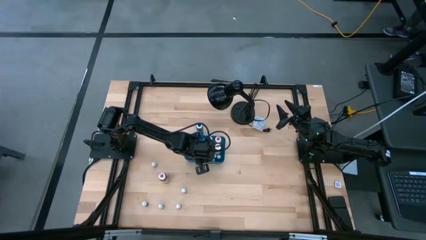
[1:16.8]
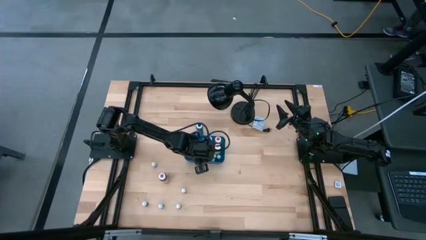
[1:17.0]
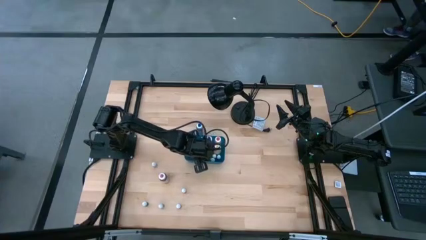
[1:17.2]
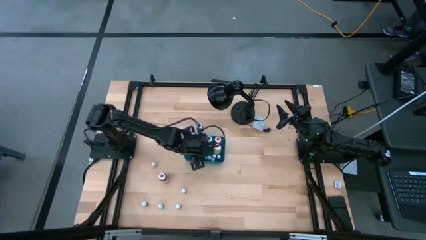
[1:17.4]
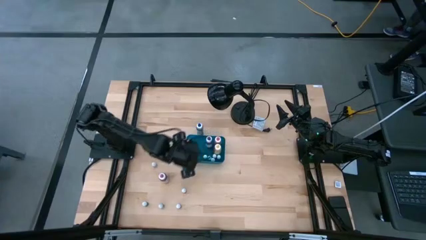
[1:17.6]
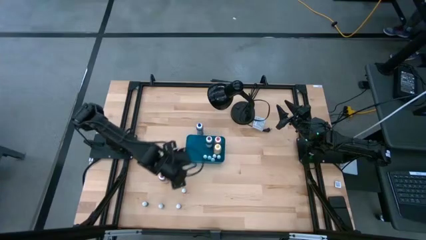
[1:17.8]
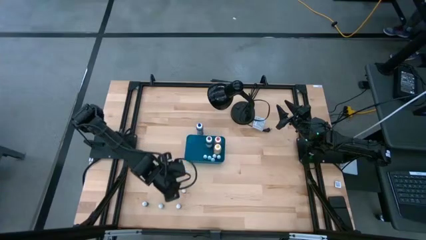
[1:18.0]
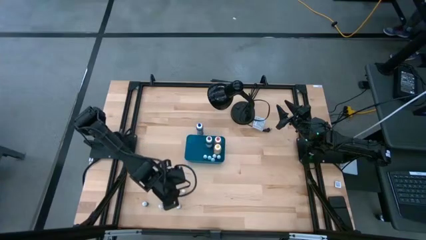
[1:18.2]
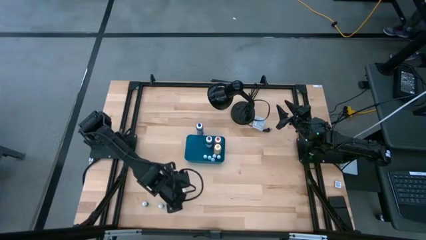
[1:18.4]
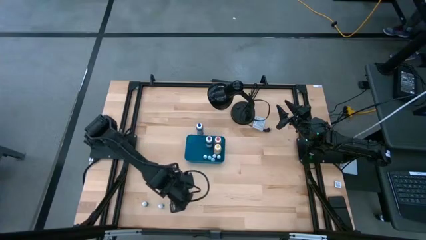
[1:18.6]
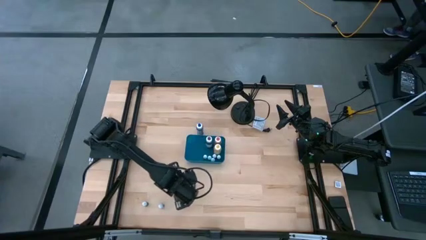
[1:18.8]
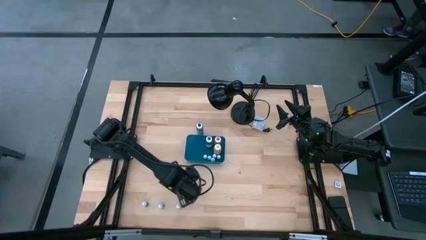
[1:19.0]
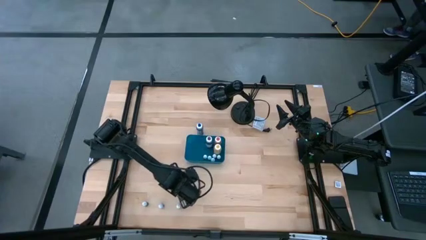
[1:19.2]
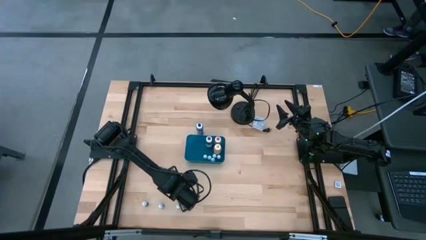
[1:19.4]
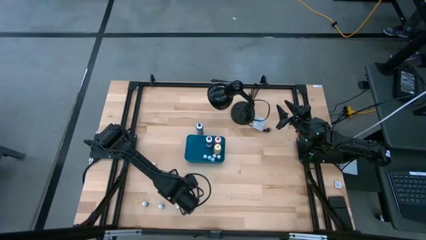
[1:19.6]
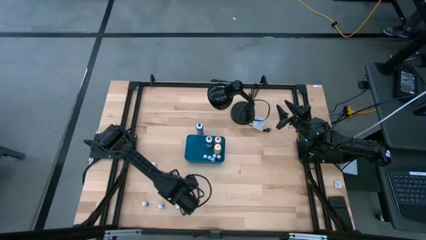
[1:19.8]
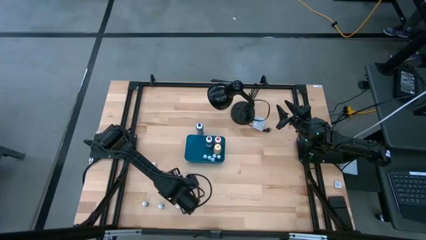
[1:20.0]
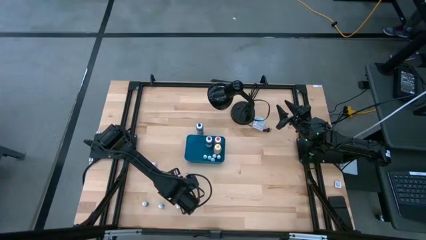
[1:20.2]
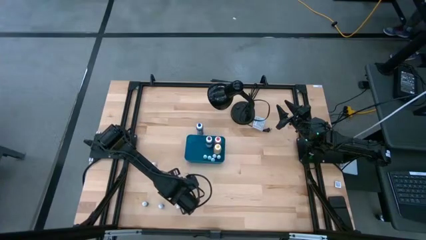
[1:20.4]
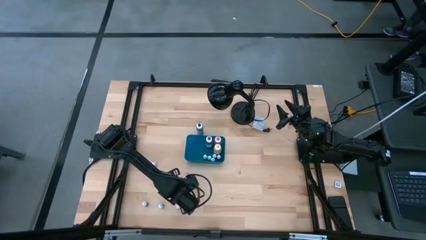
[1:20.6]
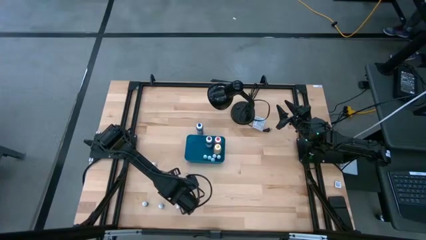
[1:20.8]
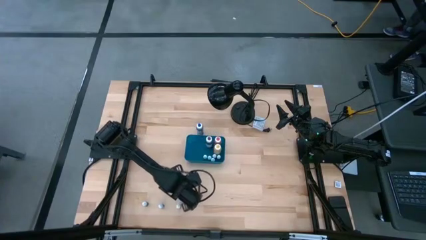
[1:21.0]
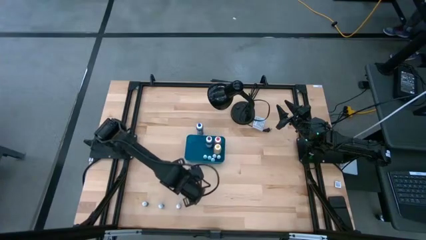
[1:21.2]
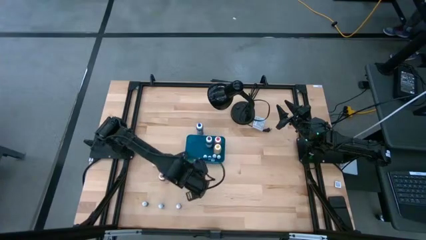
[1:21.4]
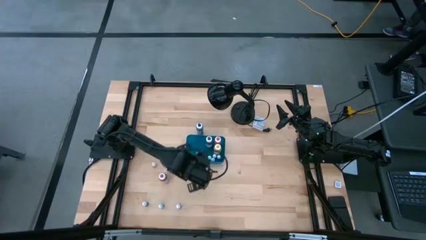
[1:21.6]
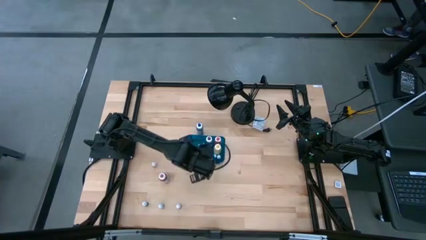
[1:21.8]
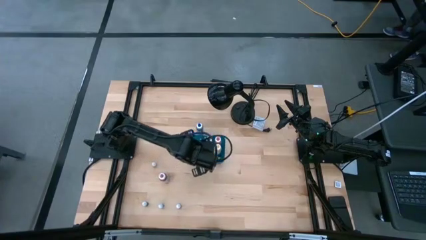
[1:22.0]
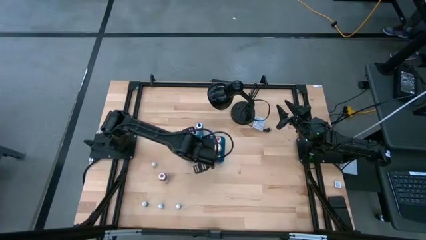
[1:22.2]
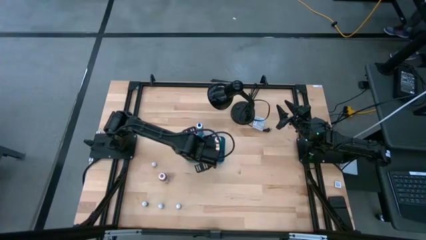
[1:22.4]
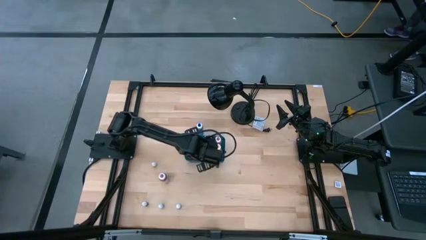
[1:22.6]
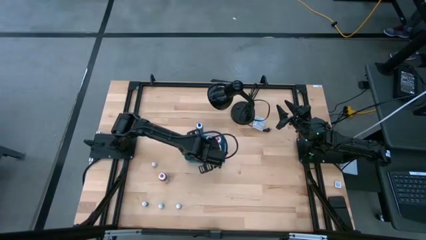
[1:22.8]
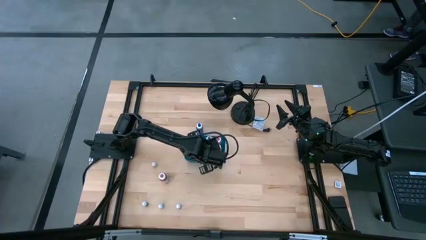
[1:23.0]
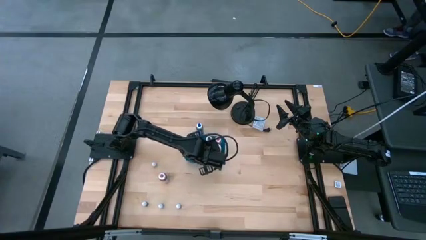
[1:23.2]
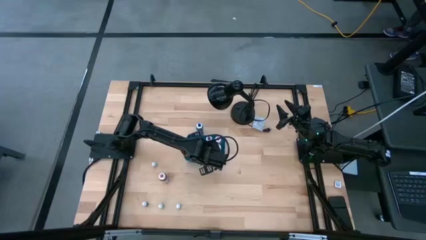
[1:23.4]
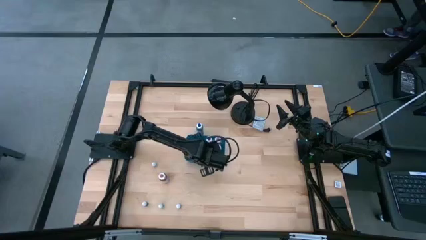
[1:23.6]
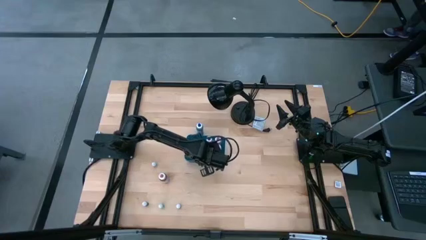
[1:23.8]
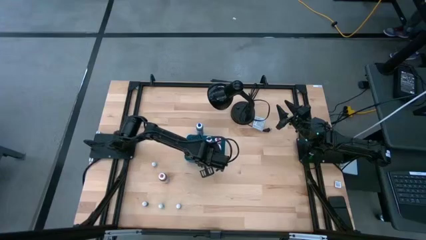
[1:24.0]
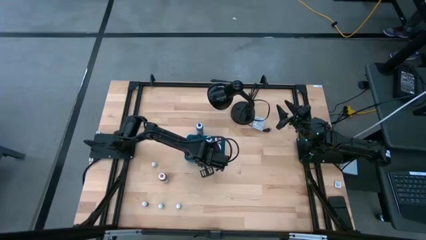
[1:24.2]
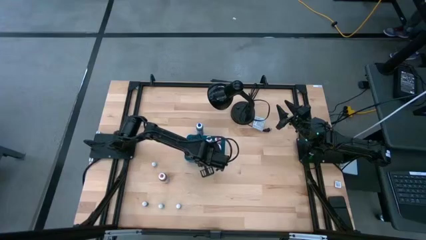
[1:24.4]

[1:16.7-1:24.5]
Task: Pick & Place food coloring
Put the small black food coloring bottle into the blue bin

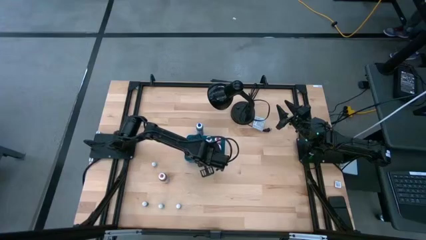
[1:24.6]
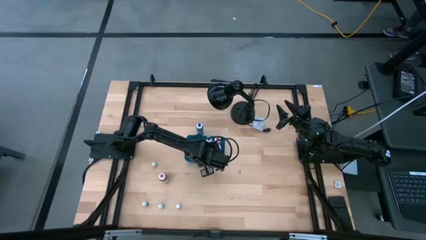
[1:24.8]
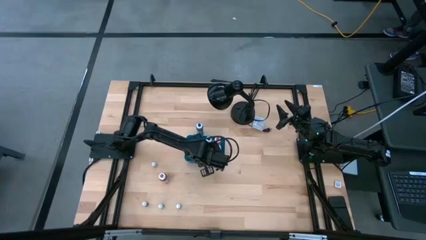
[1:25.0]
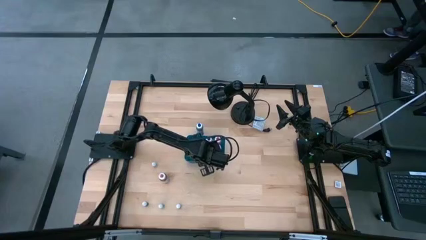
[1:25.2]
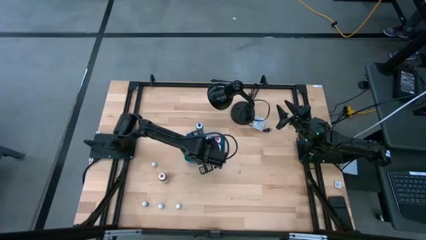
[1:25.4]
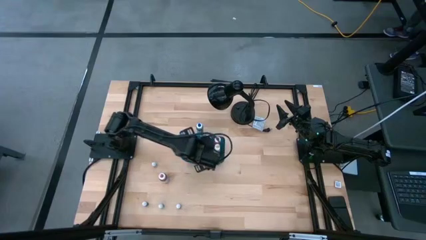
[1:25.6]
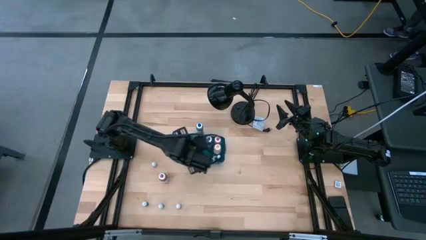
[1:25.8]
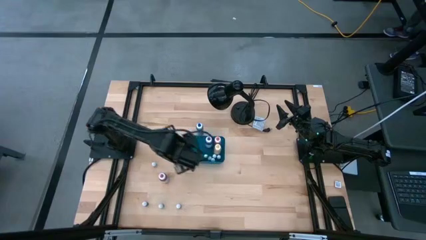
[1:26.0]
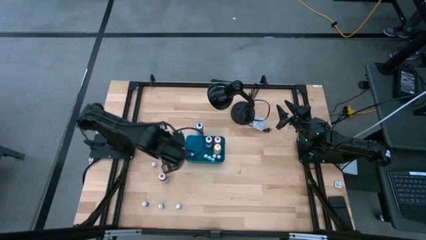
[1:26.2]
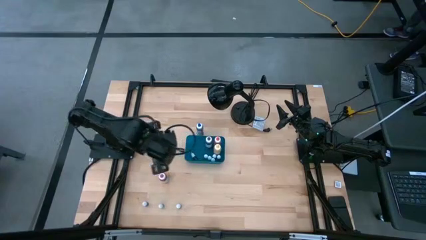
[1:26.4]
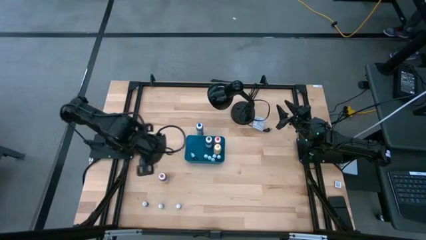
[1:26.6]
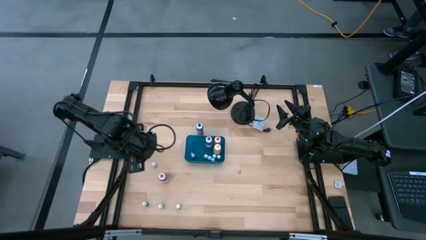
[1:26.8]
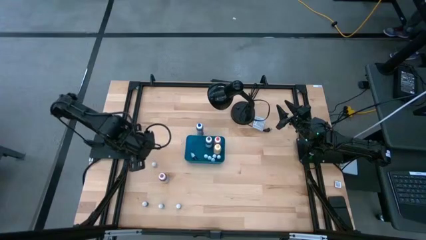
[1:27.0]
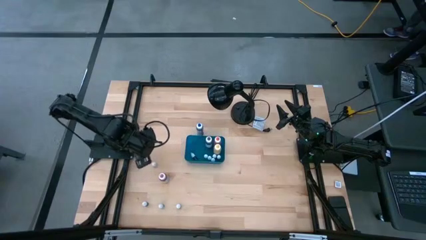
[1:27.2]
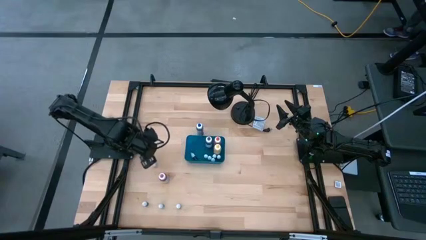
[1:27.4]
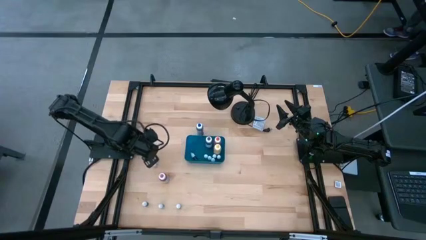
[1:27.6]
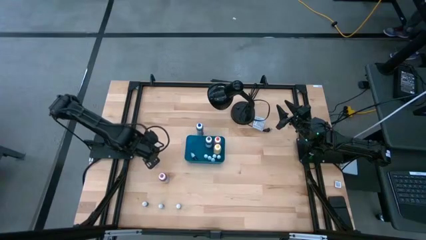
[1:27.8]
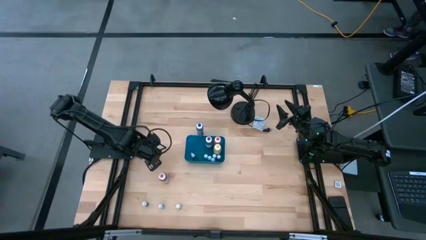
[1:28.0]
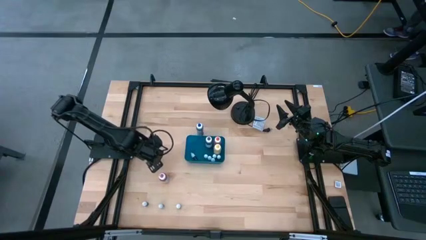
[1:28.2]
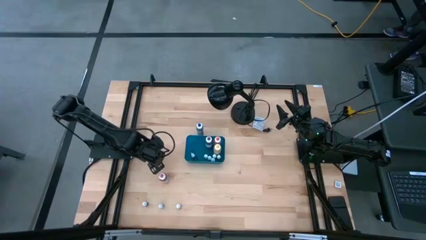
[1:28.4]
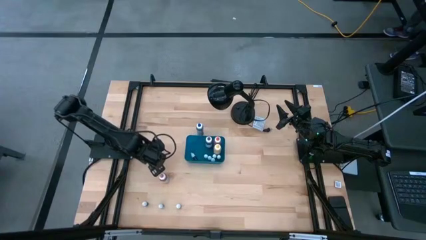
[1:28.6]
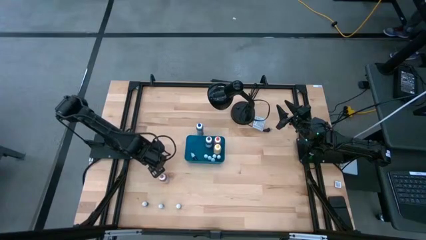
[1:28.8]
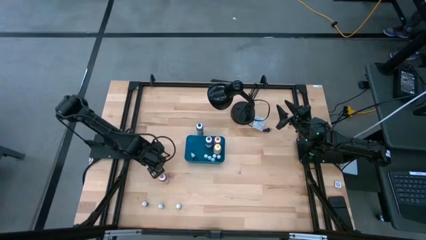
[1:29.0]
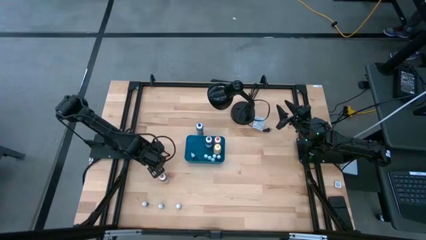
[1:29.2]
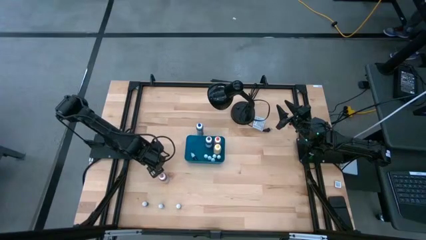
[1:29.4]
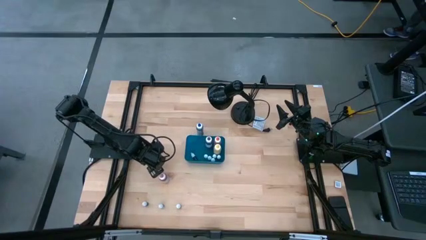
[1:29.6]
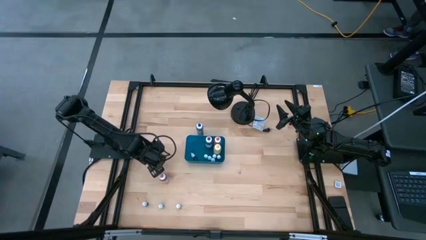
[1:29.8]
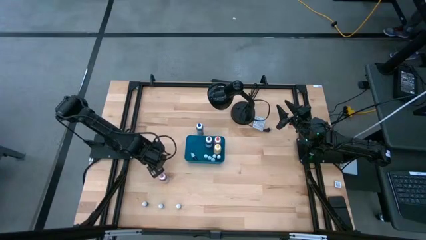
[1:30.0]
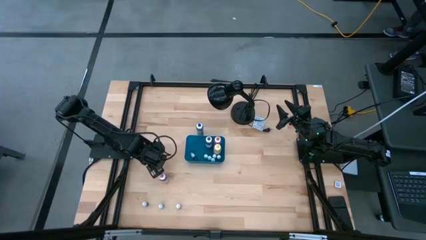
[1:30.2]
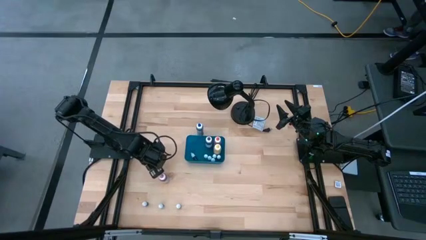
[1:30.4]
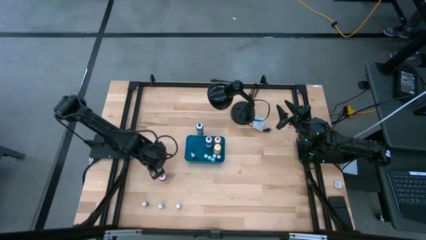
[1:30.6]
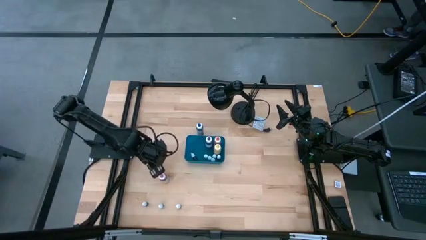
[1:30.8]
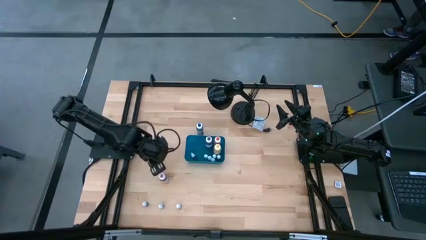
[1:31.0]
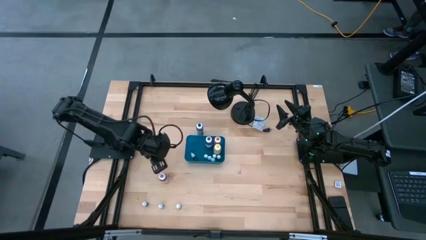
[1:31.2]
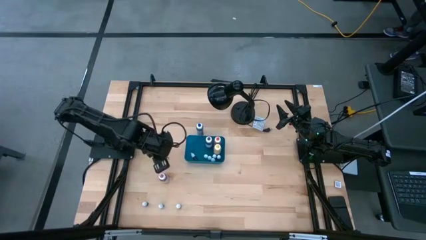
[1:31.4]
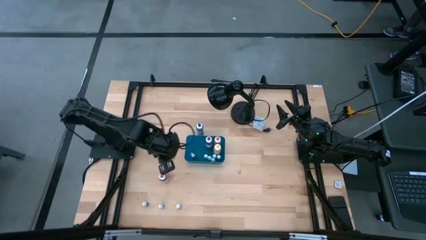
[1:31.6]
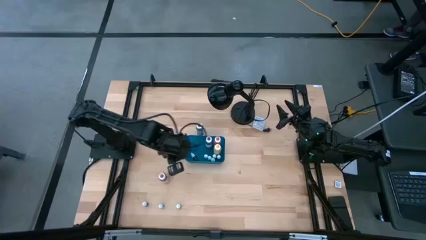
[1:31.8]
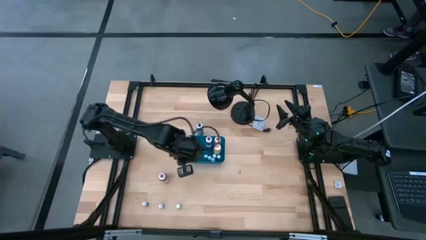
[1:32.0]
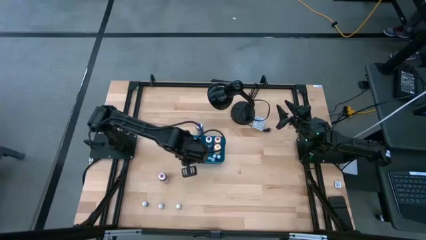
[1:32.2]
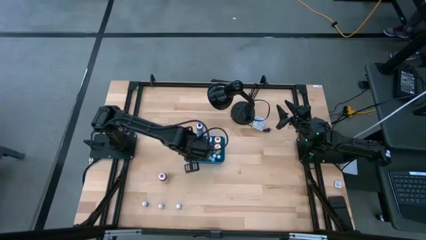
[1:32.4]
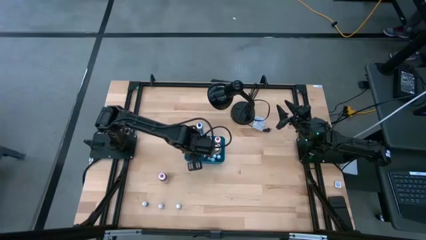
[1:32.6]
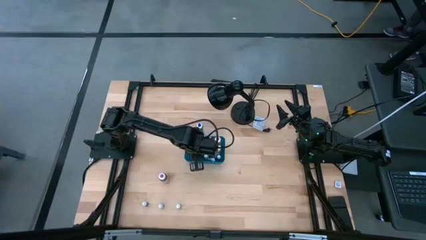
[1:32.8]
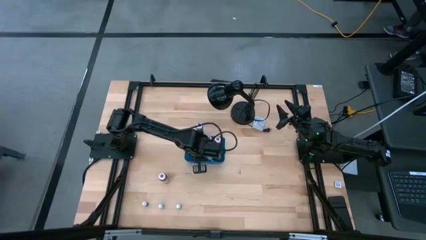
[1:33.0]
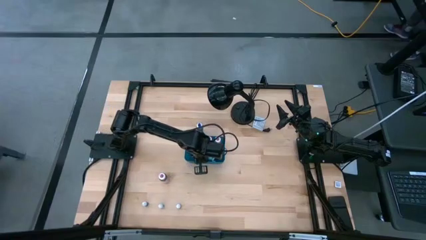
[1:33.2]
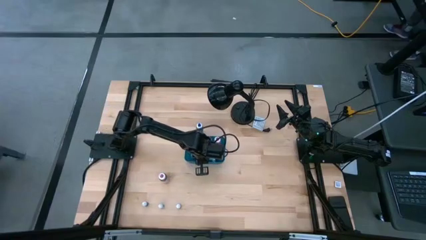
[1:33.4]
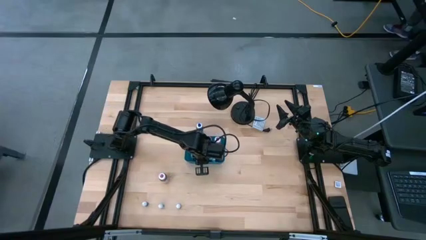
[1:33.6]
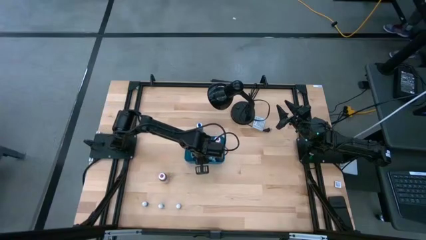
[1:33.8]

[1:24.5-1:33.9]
Put the small dark blue food coloring bottle into the blue bin
